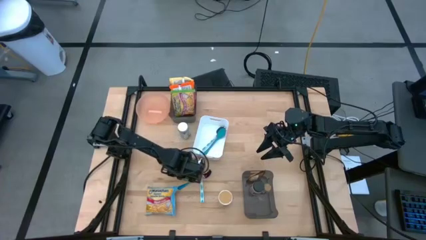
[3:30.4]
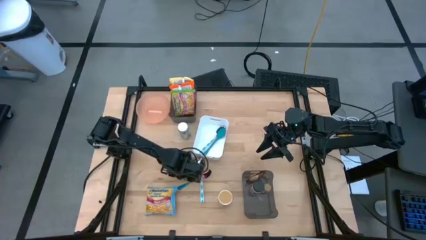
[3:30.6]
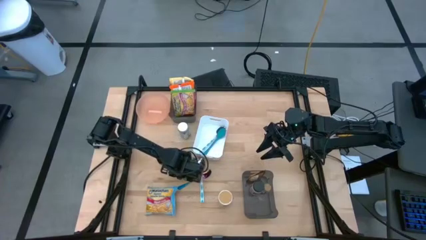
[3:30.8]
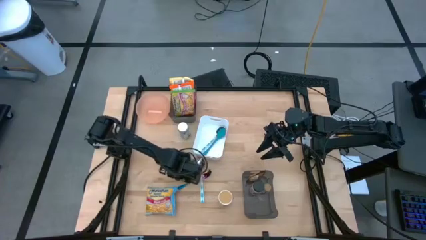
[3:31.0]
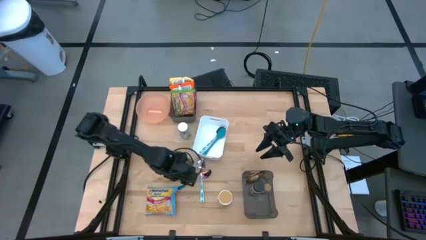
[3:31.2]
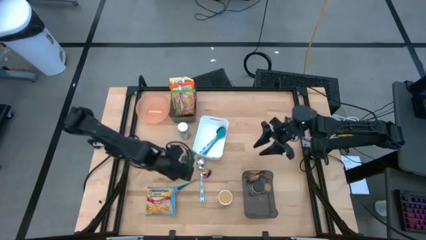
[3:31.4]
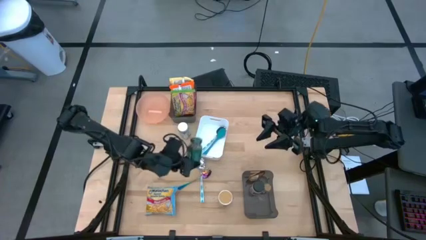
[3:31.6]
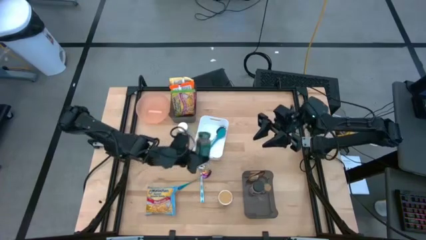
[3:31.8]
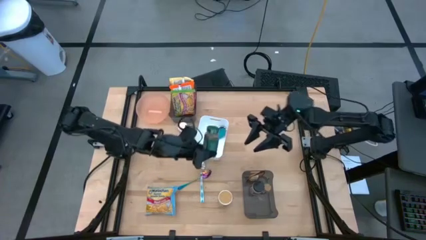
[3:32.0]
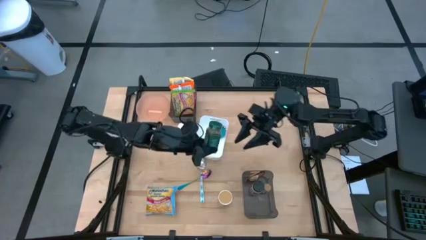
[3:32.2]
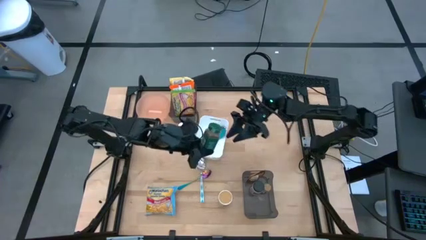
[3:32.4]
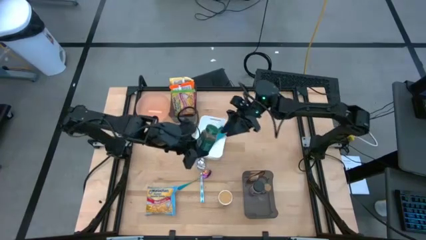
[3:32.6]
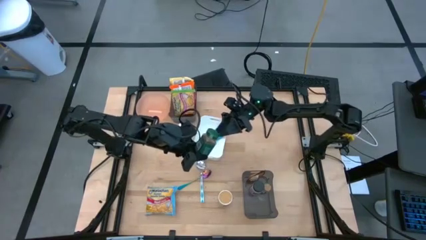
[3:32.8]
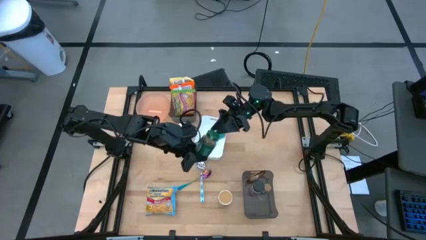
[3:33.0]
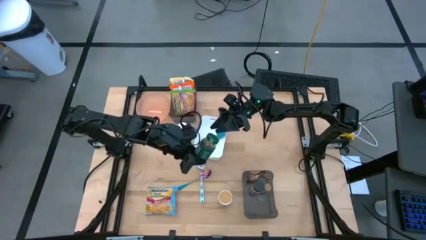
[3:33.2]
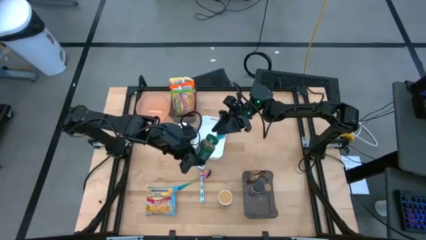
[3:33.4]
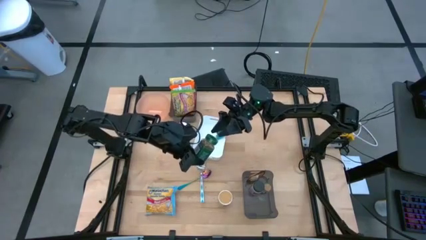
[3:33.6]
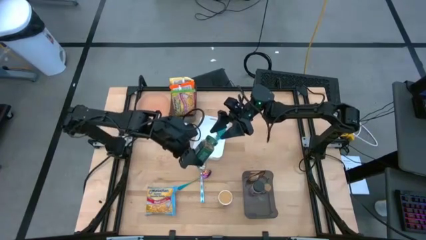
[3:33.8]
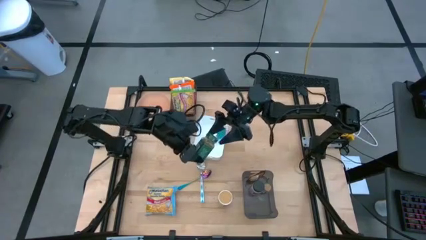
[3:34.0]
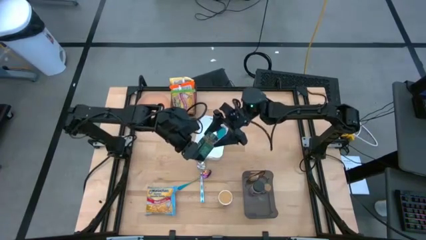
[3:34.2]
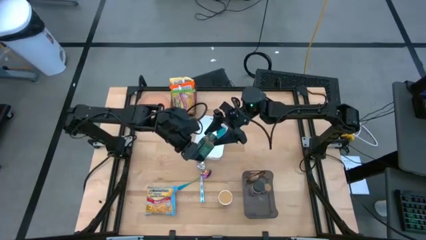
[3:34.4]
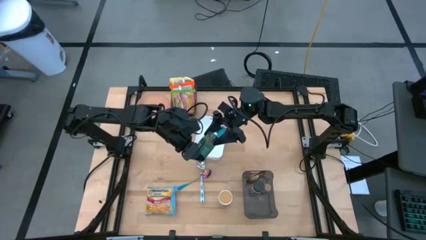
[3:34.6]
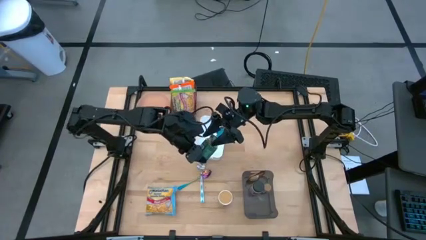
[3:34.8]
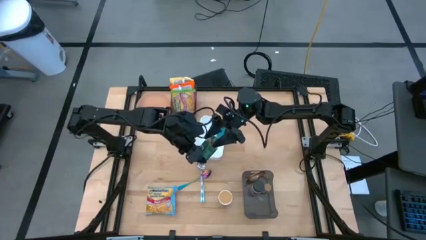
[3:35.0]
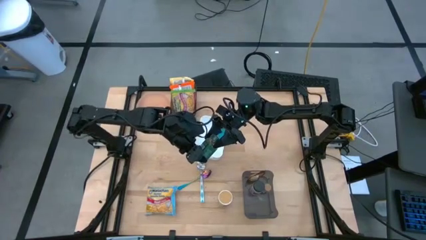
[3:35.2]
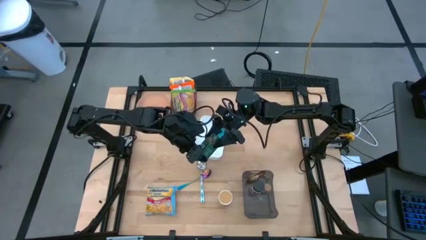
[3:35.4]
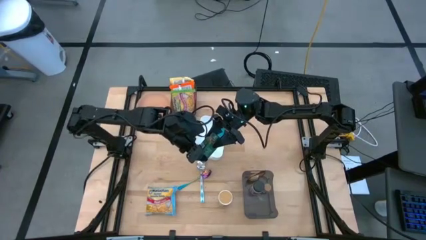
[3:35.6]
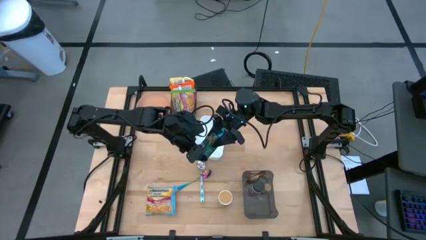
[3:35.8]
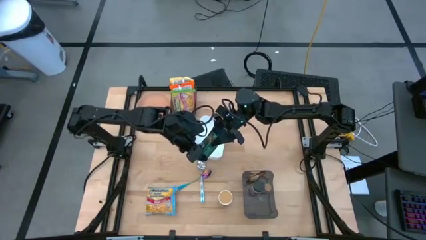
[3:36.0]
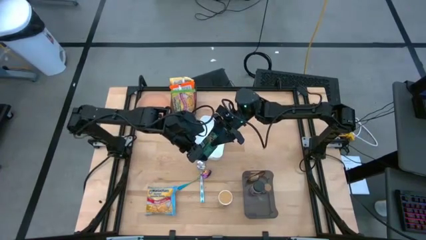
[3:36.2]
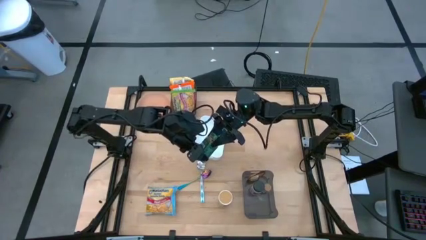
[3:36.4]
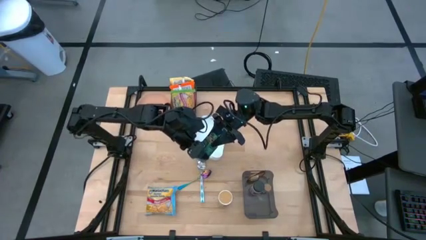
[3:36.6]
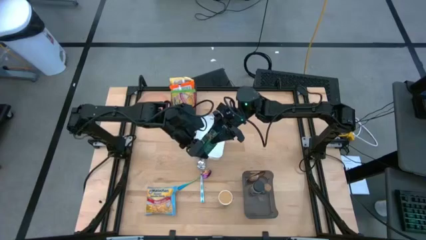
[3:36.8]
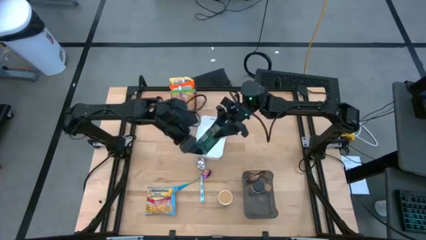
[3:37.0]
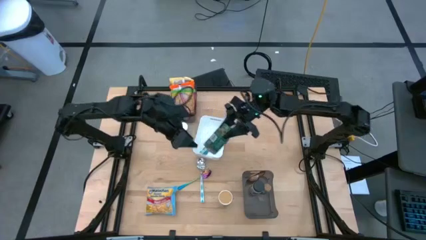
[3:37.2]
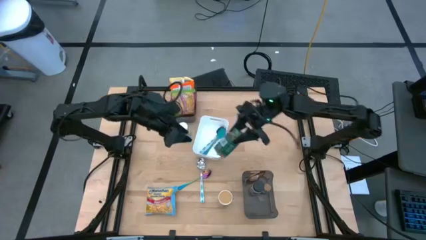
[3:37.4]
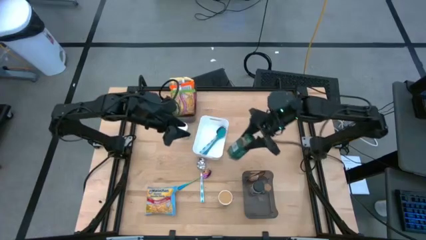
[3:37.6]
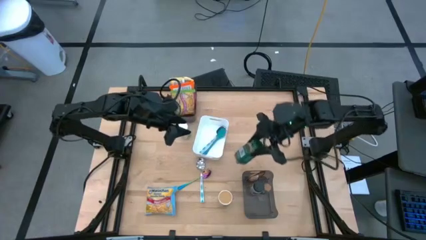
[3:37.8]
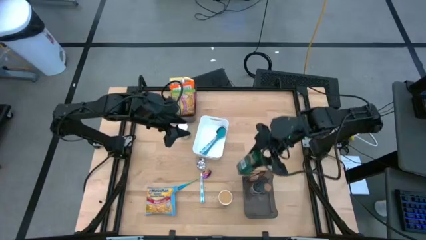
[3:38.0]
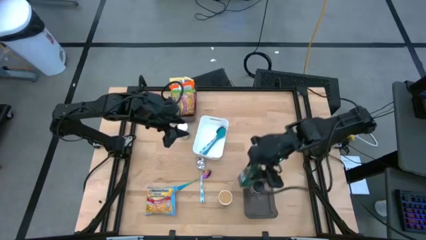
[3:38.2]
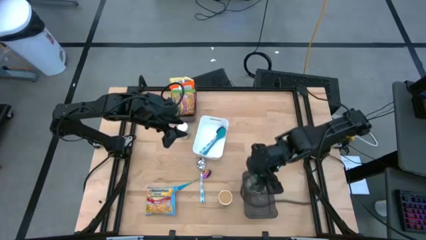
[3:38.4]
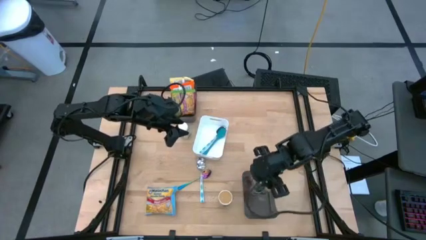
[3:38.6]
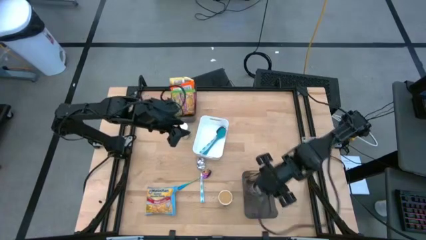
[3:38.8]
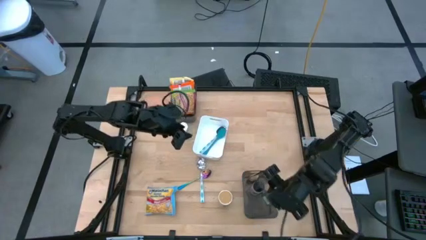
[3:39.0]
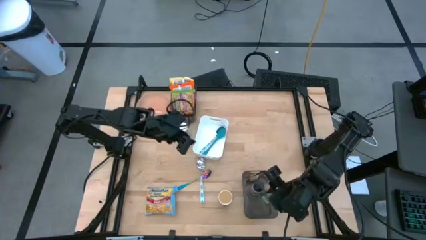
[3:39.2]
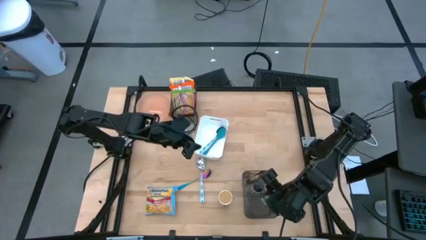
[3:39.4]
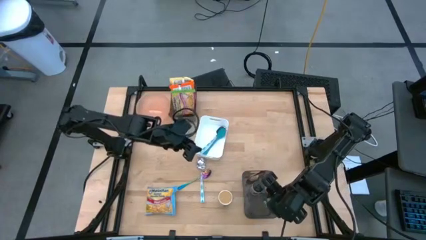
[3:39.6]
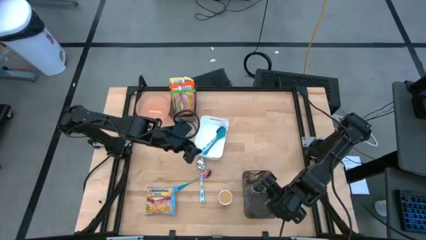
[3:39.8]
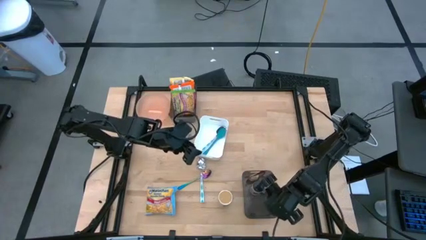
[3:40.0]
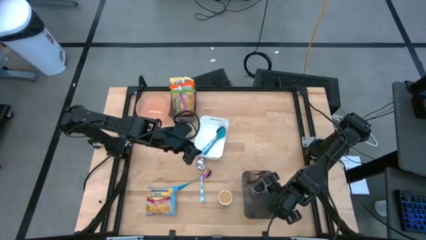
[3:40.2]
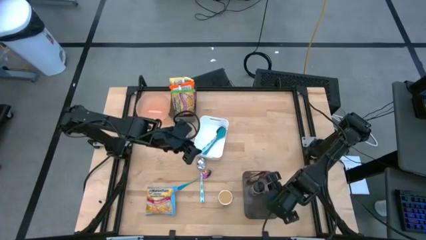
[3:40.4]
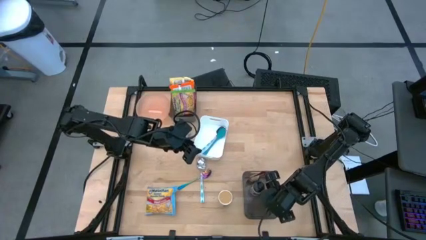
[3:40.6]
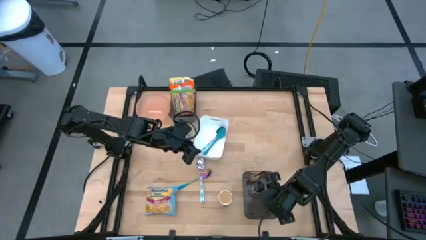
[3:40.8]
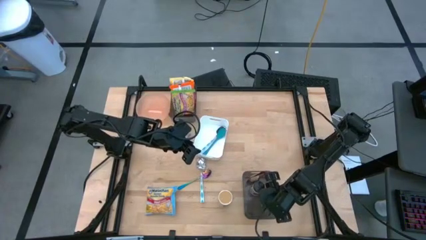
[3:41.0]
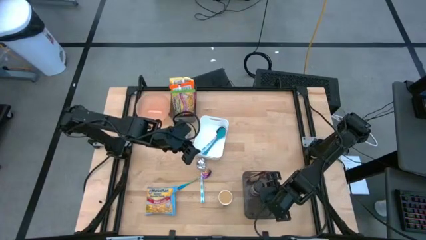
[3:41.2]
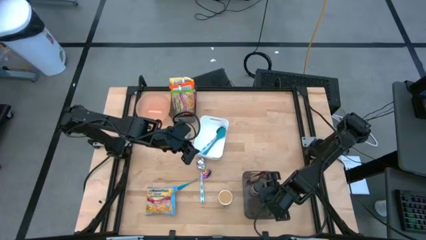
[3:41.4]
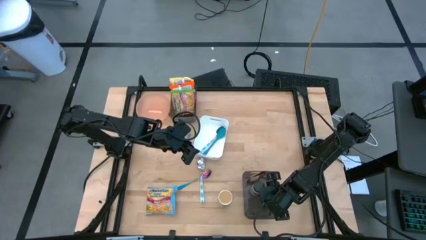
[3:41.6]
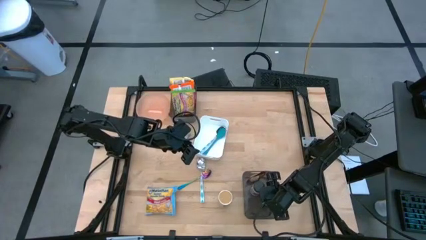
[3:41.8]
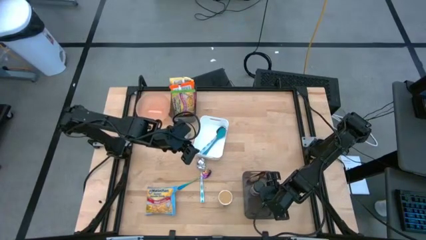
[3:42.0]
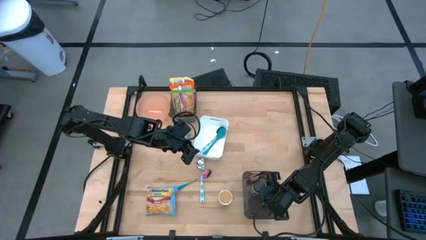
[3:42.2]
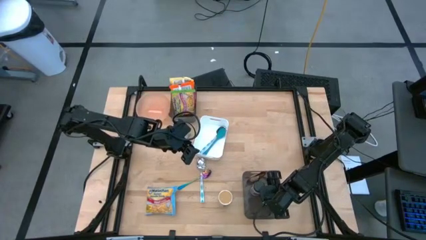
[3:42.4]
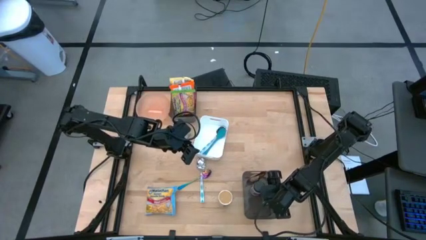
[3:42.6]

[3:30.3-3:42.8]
Task: Pick & Place Food Item
Put the green seasoning bottle into the bottom black bin

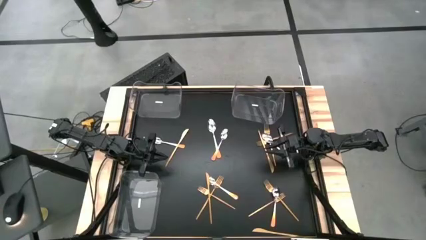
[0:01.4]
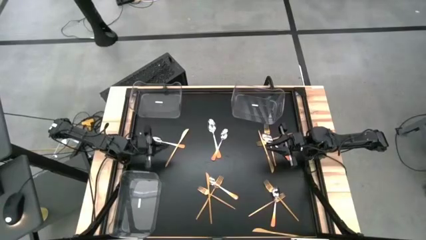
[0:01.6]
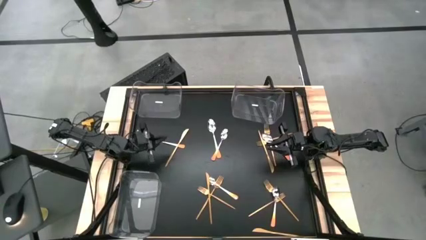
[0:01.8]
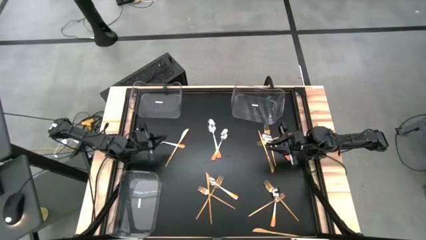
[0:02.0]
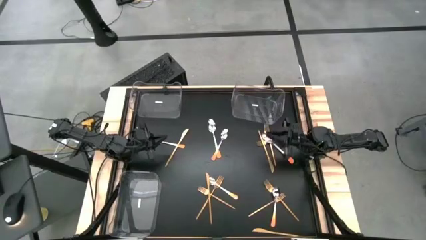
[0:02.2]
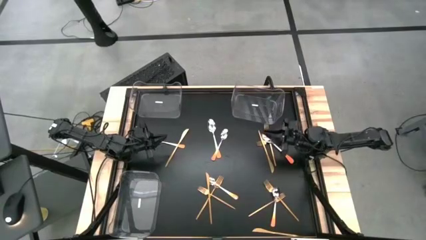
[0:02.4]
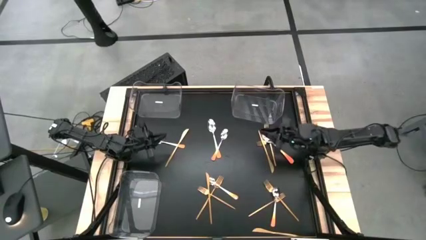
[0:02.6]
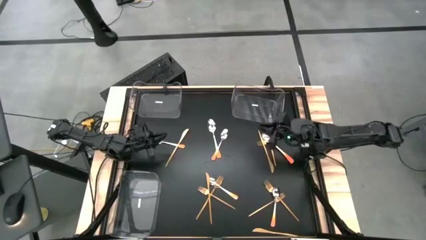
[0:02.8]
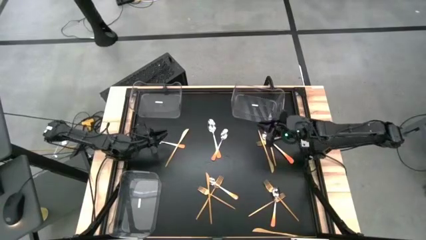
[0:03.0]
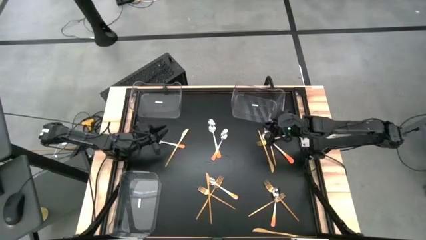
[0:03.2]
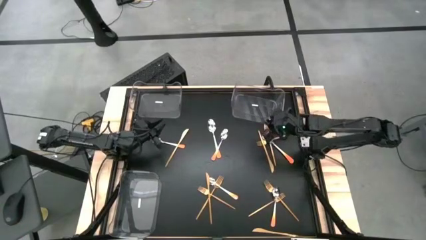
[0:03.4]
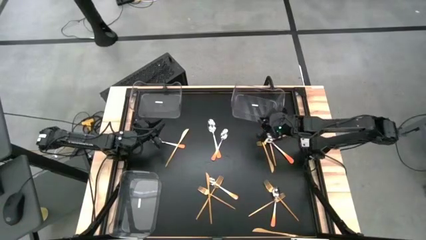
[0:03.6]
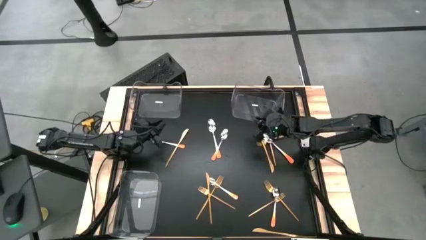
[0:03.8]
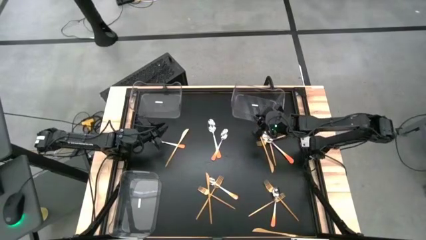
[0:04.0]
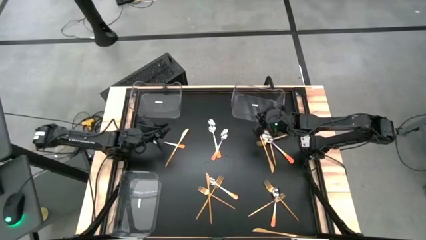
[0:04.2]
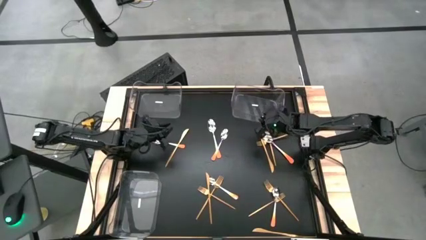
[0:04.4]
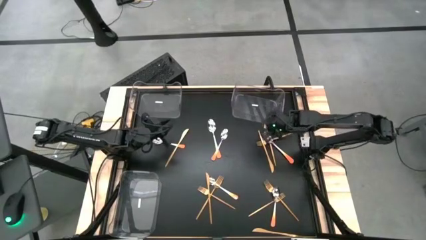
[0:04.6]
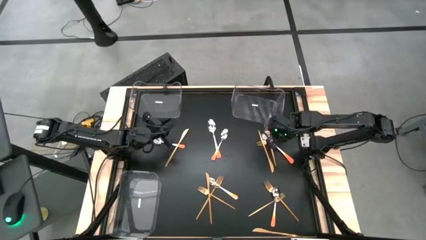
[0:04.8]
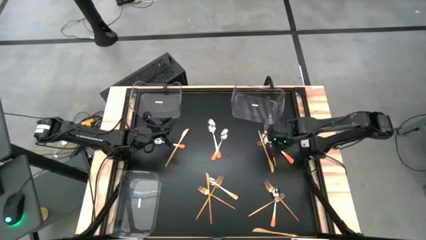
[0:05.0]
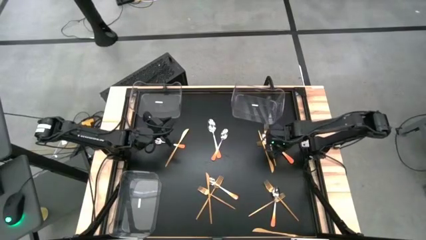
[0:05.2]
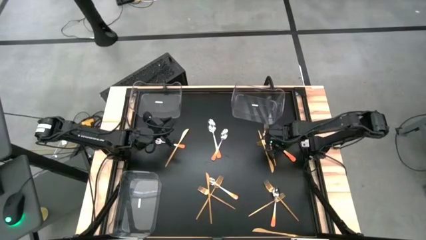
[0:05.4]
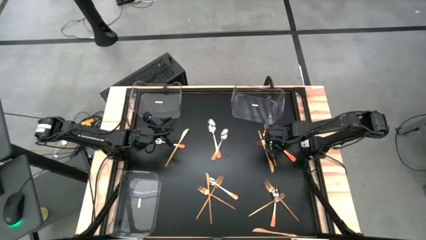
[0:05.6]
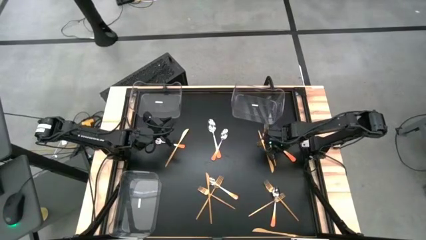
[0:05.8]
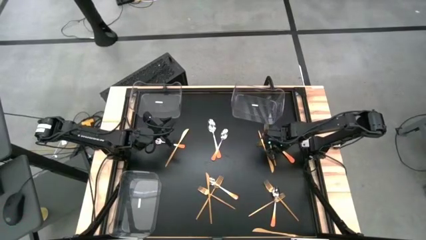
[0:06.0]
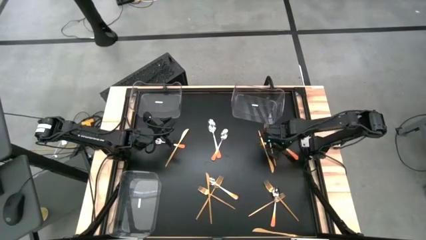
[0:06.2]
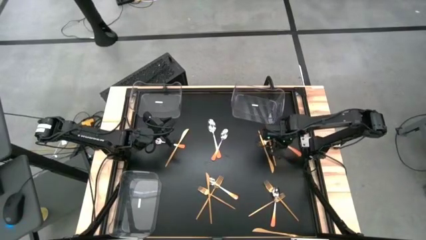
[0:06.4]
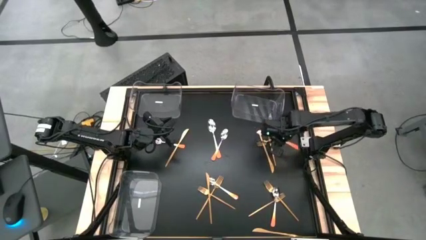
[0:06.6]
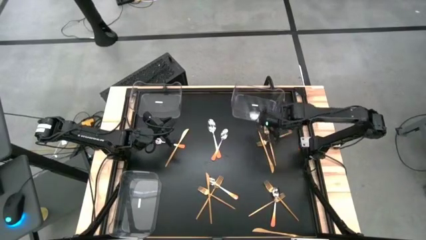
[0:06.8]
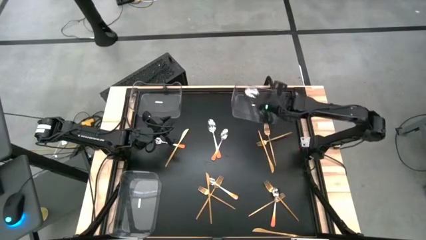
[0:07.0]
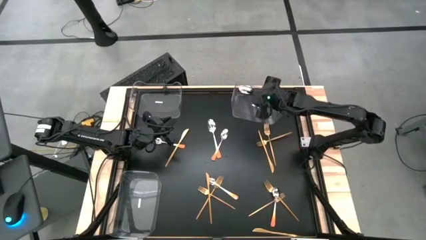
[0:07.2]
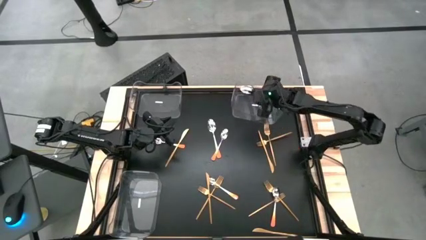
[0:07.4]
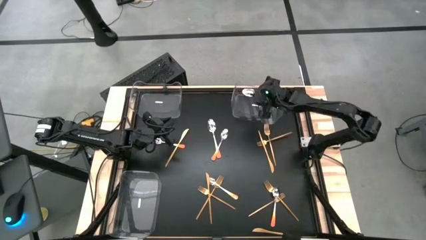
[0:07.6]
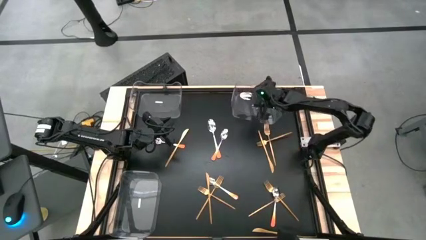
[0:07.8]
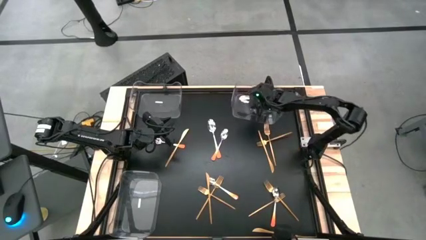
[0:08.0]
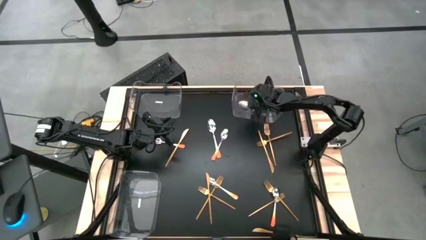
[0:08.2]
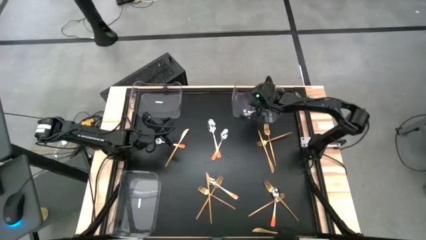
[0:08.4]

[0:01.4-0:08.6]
Task: Sort silverware by color (type)
Put the silver and orange spoon into the top right transparent bin
